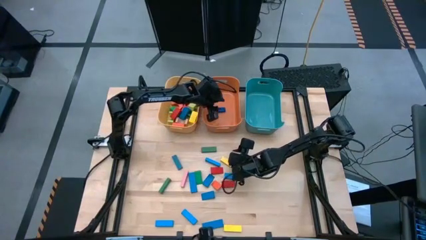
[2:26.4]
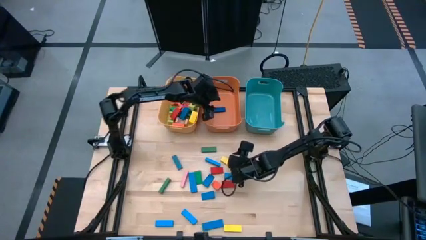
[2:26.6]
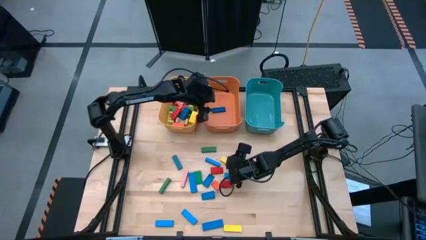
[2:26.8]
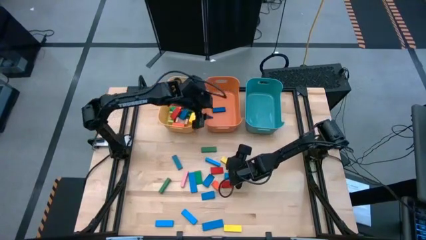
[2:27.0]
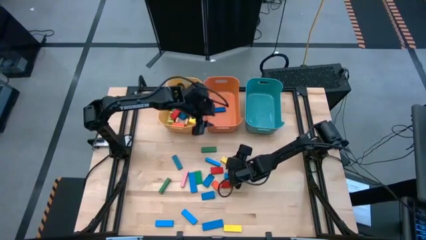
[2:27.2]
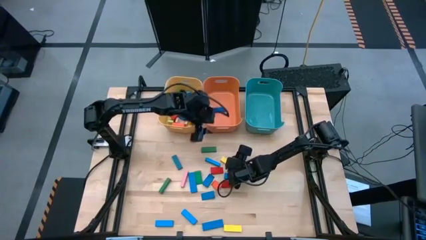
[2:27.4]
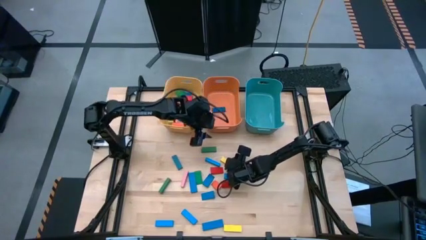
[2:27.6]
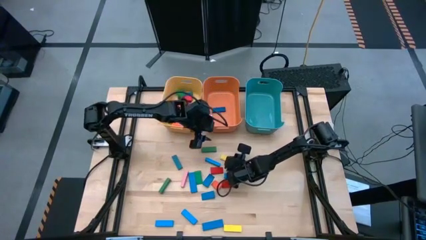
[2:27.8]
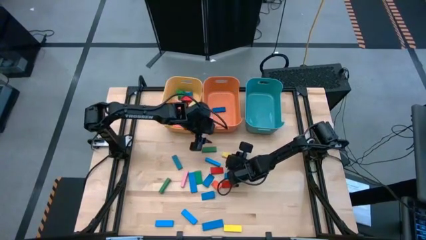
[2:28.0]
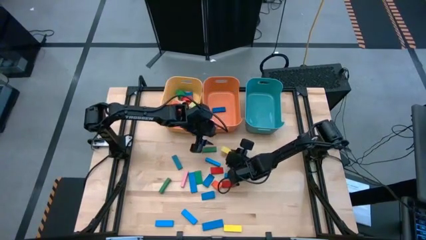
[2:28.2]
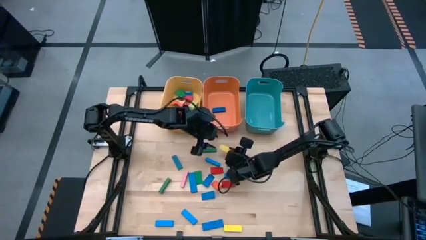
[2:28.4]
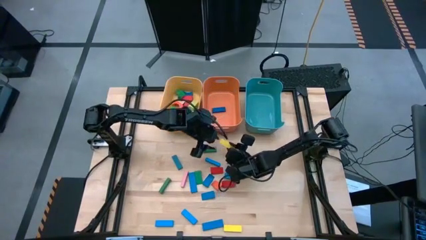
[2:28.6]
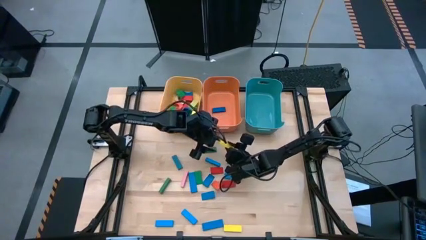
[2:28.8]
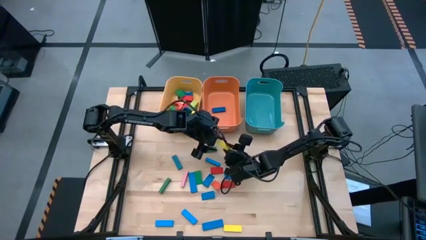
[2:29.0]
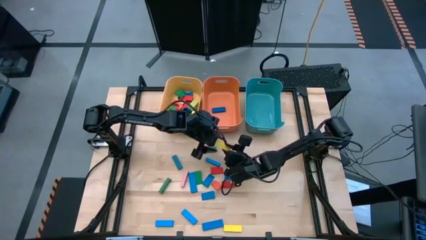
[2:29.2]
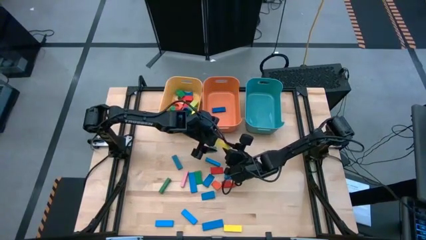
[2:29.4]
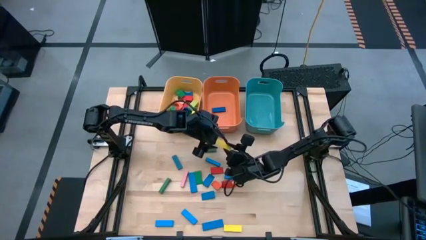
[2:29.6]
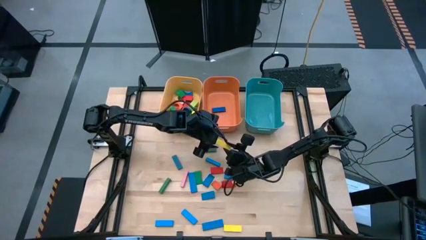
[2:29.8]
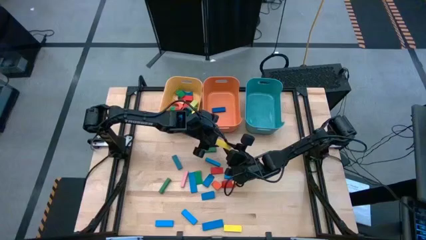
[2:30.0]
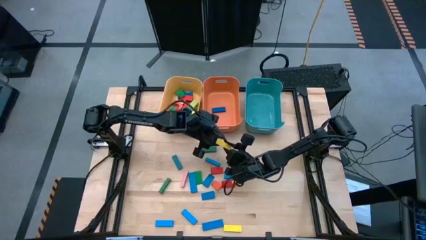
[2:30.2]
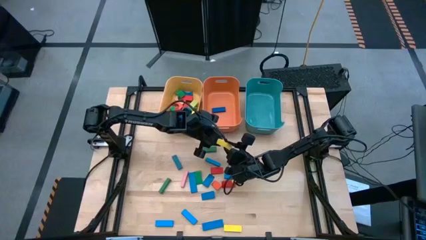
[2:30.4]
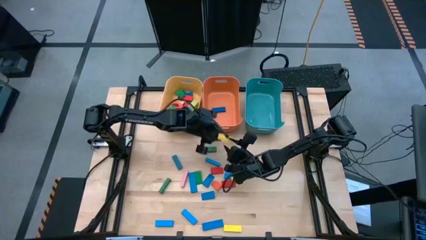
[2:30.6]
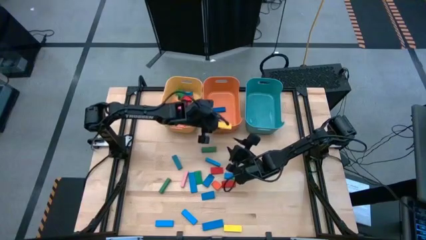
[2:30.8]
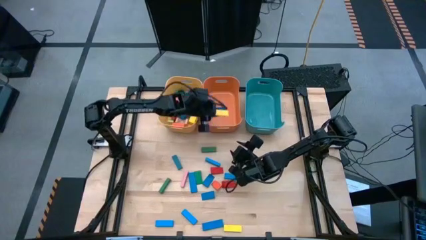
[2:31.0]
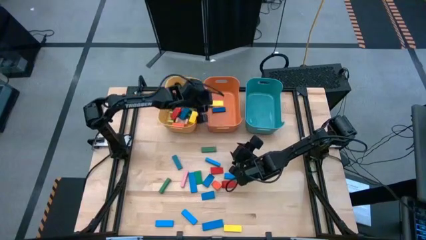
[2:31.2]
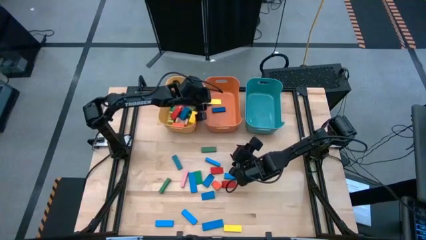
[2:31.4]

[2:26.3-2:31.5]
Task: Sort blocks by size
Put the yellow rectangle block into the orange bin

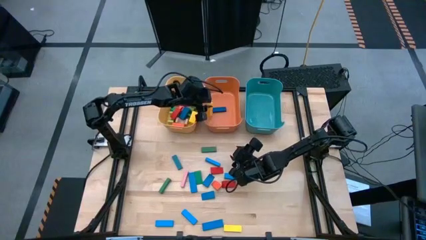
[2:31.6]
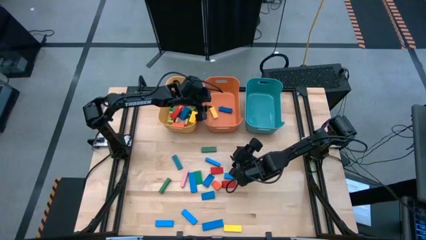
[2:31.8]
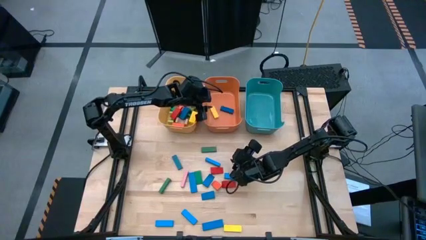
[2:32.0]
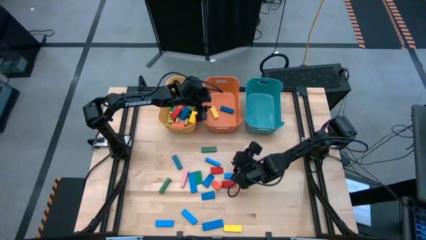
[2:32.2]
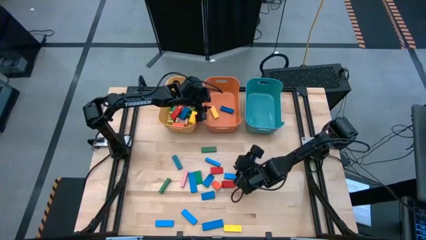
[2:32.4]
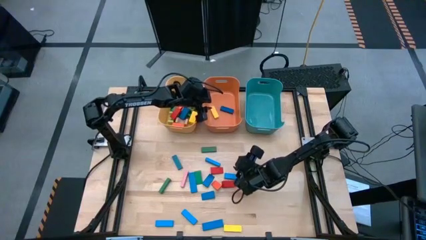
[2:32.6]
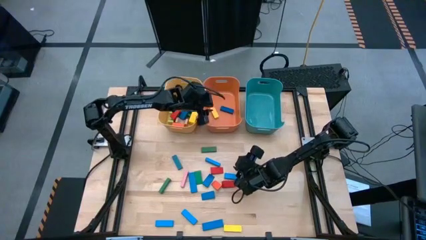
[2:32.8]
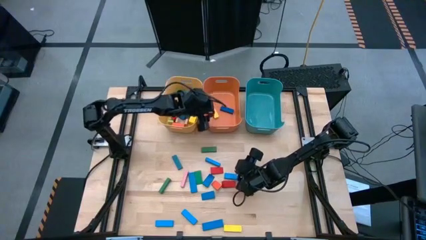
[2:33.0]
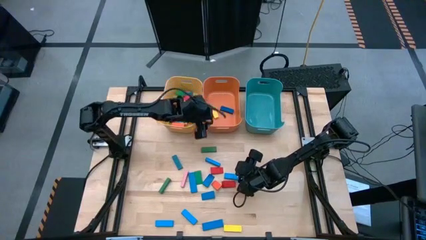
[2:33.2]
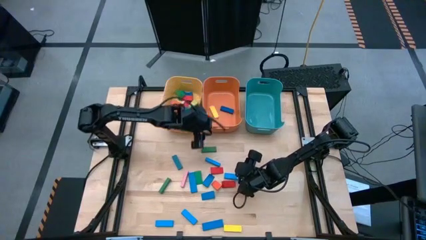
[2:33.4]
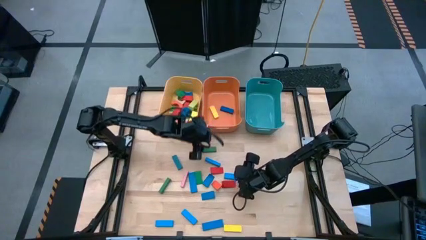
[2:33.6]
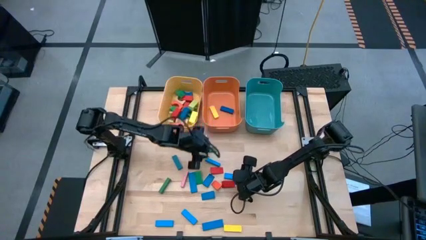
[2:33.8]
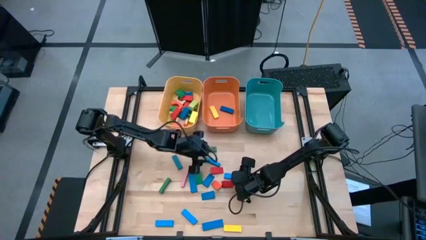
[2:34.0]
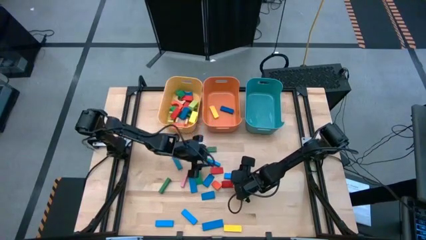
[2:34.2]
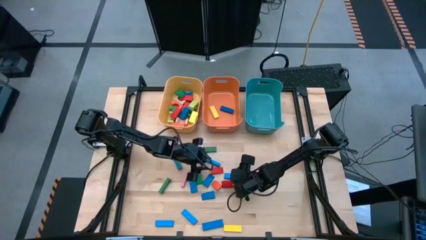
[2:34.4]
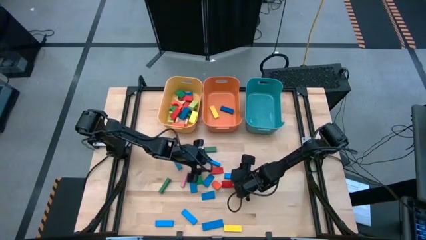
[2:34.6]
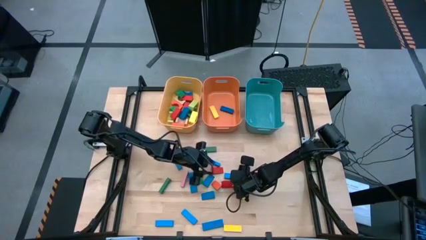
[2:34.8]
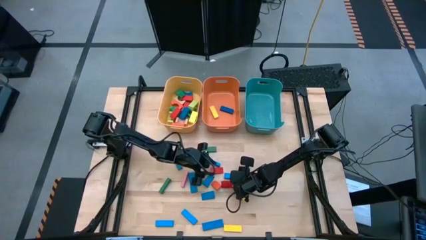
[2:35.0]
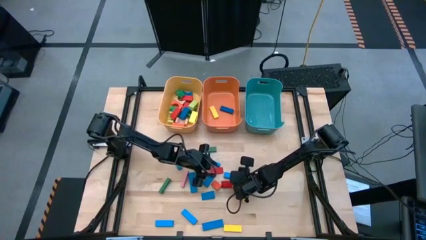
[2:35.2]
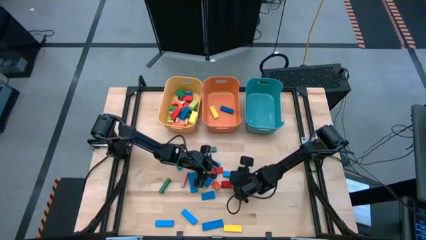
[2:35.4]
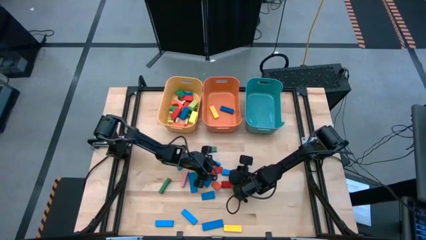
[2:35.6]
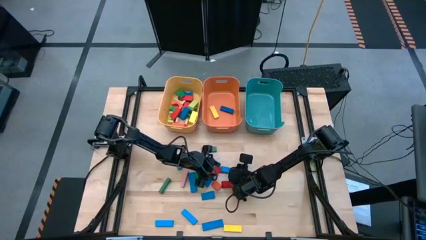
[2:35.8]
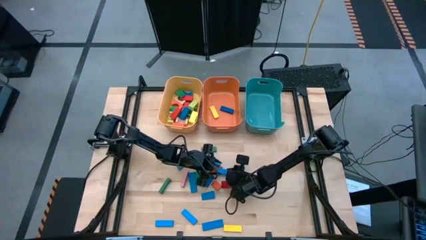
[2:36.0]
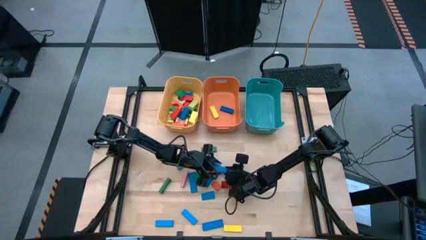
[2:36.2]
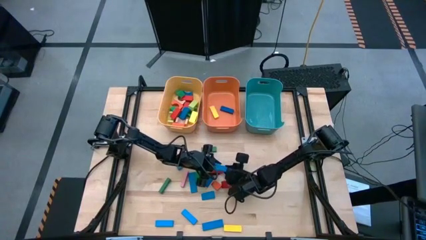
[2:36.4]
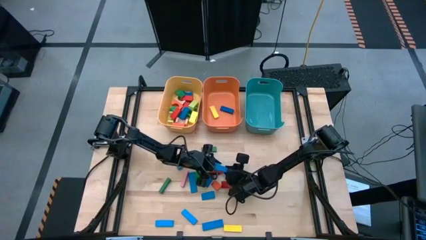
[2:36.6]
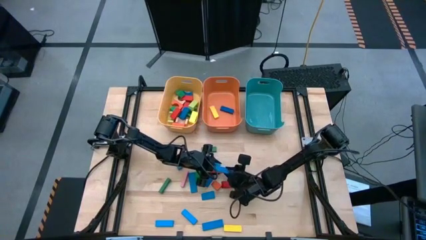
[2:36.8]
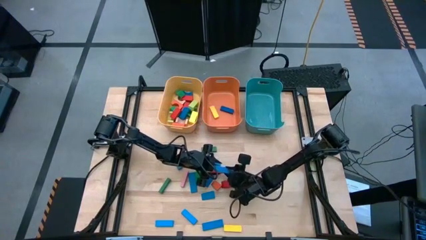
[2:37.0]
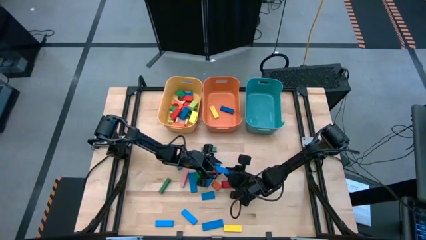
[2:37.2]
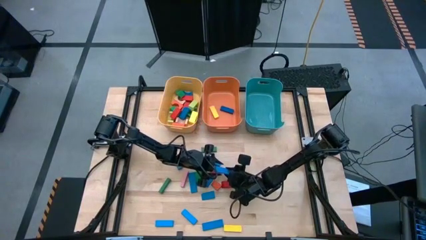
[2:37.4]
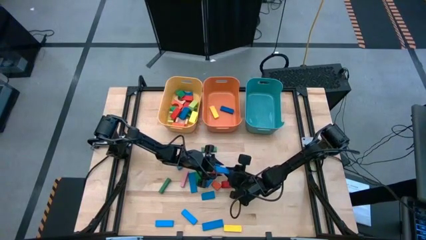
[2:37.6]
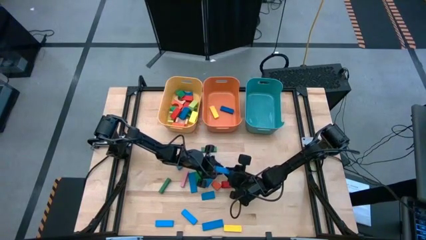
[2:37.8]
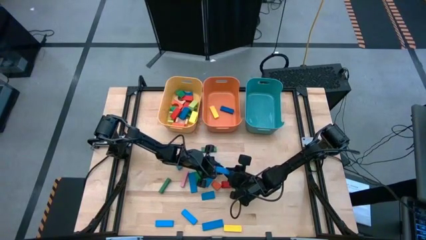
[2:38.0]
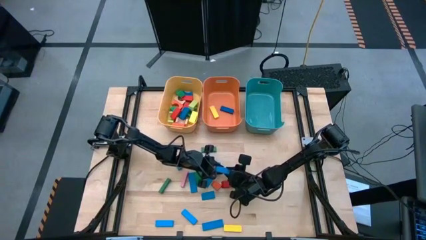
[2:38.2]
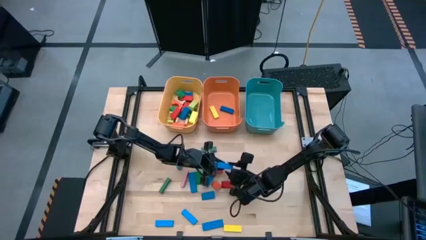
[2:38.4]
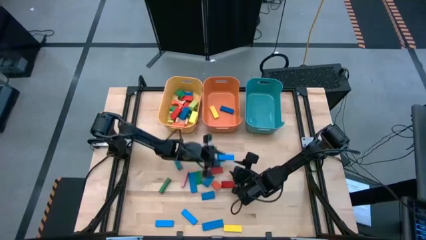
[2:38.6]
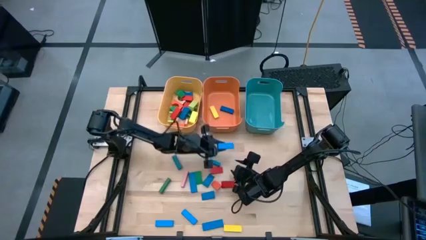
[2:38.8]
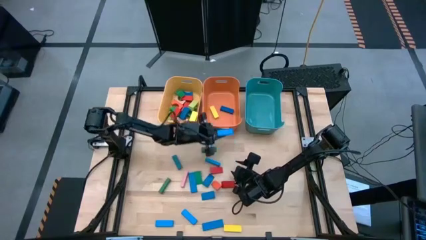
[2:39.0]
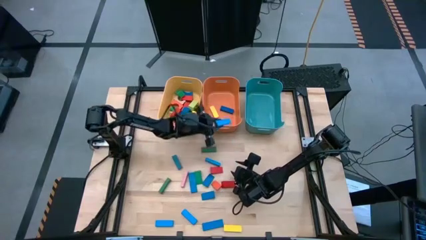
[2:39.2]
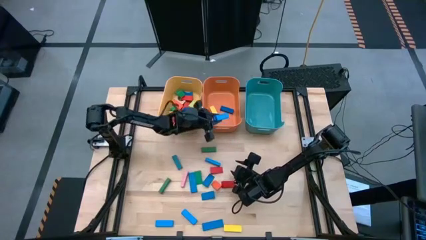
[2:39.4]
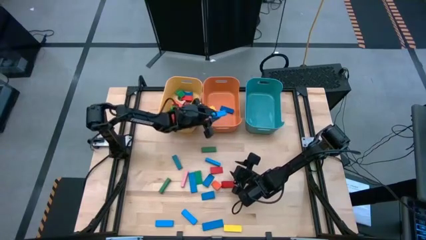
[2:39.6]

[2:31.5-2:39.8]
Put the blue rectangle block into the orange bin
